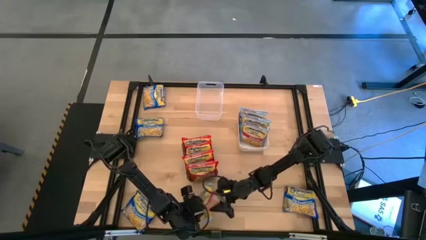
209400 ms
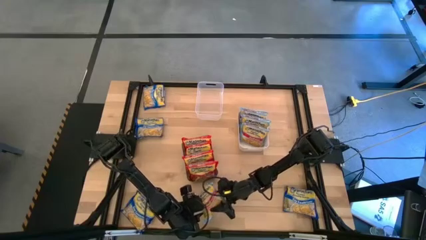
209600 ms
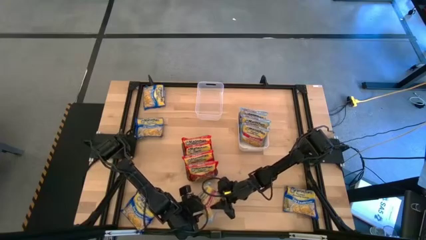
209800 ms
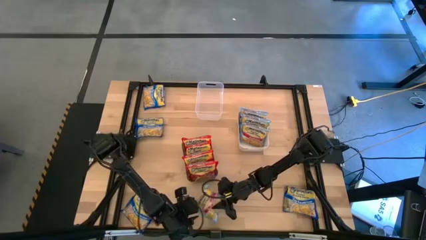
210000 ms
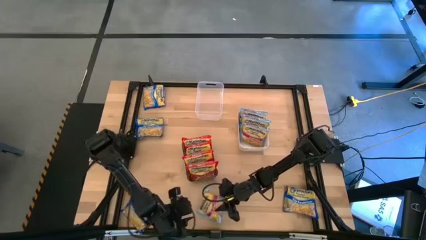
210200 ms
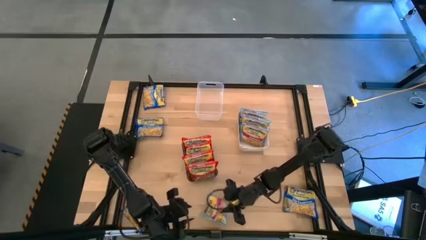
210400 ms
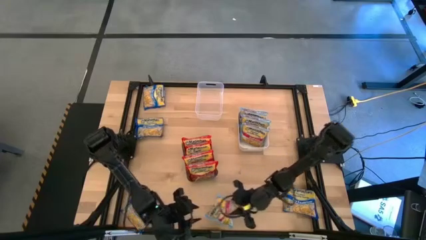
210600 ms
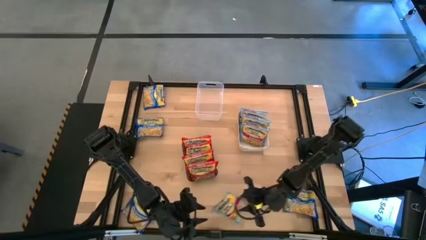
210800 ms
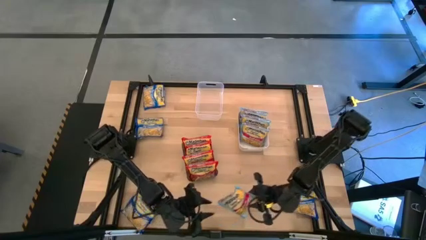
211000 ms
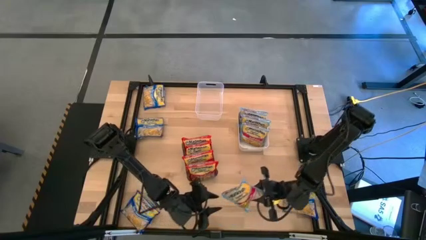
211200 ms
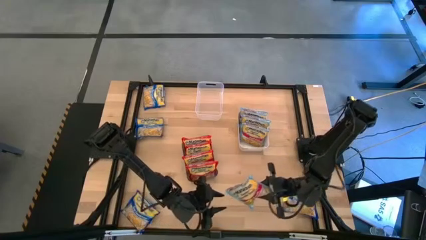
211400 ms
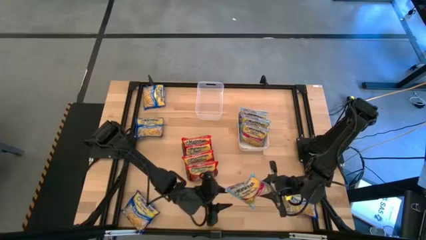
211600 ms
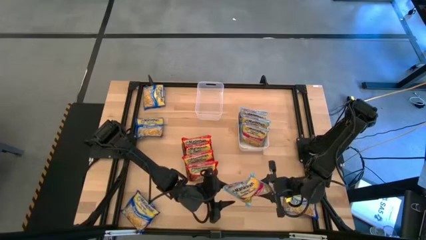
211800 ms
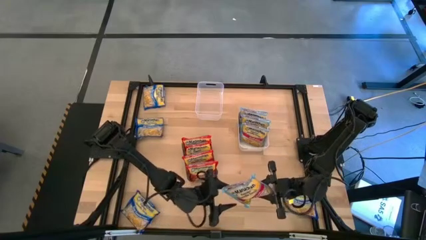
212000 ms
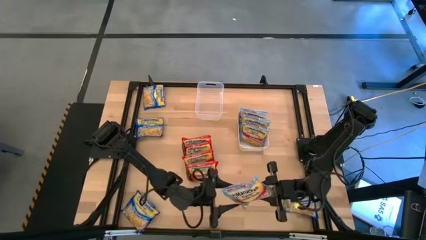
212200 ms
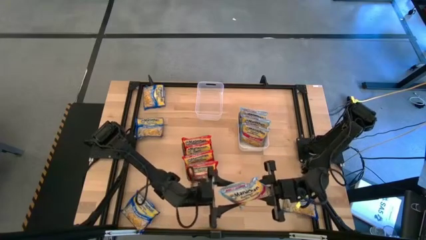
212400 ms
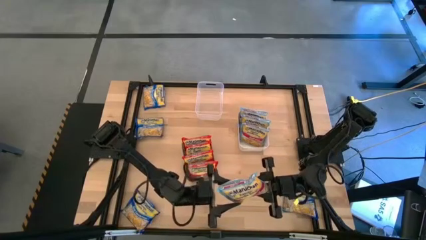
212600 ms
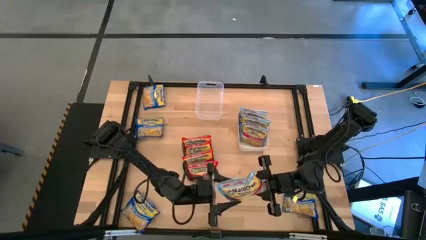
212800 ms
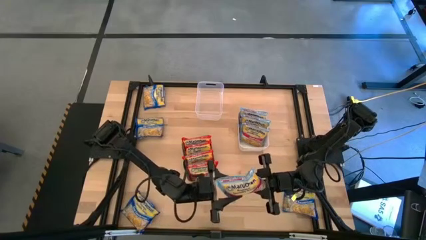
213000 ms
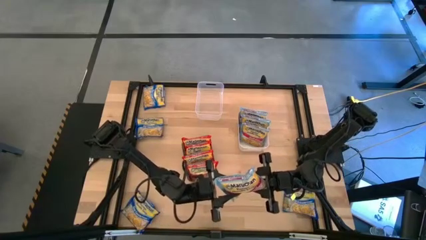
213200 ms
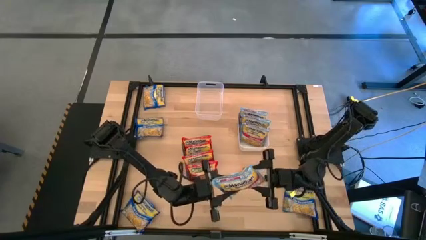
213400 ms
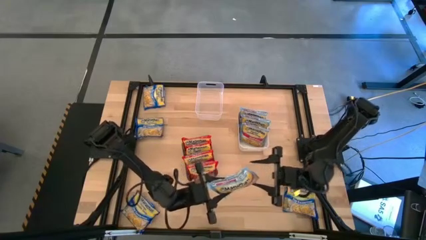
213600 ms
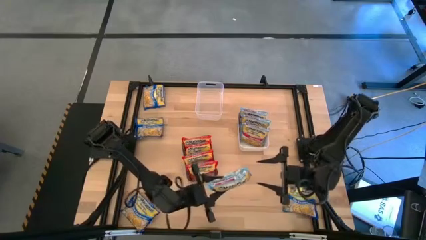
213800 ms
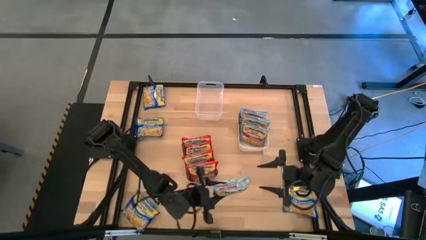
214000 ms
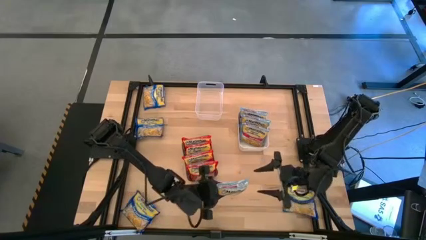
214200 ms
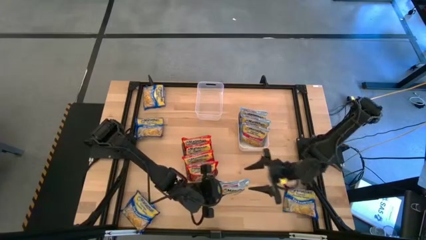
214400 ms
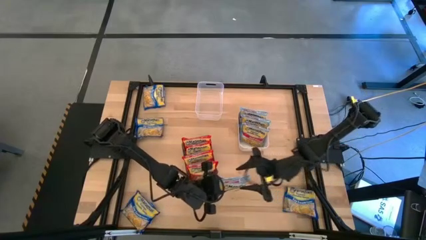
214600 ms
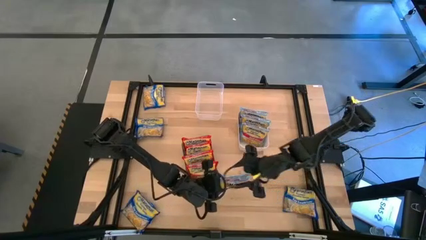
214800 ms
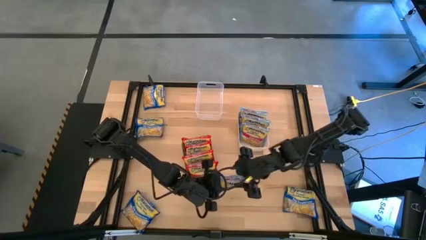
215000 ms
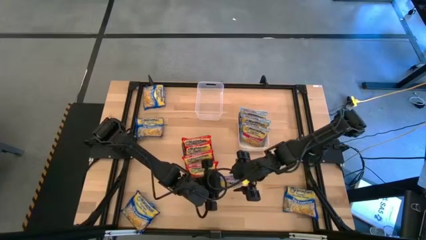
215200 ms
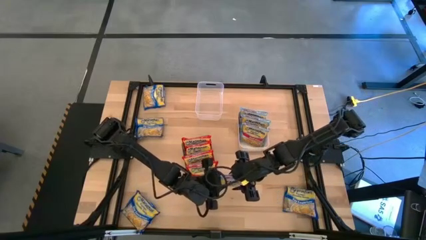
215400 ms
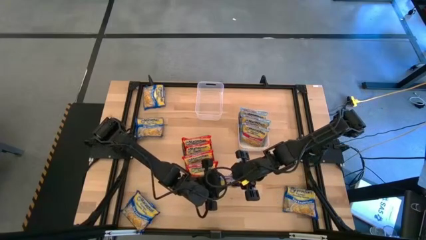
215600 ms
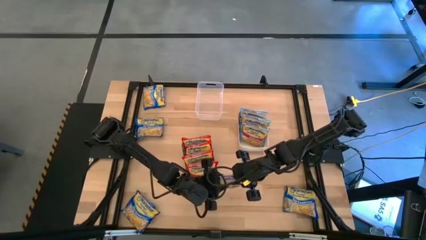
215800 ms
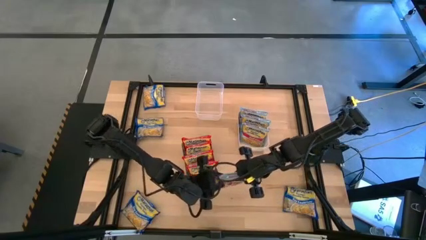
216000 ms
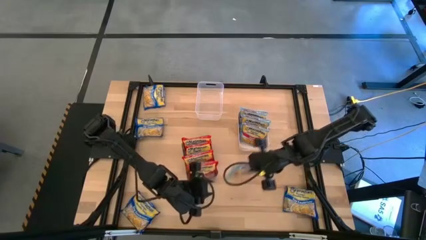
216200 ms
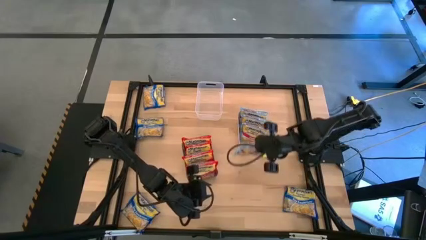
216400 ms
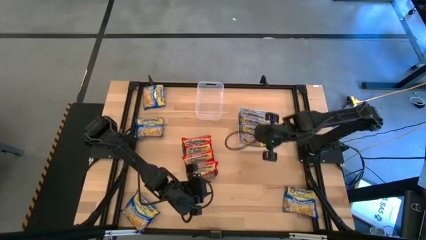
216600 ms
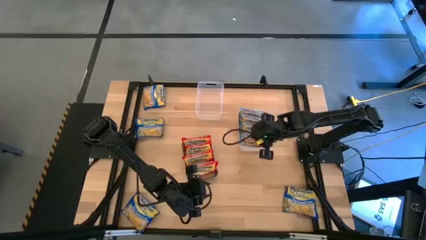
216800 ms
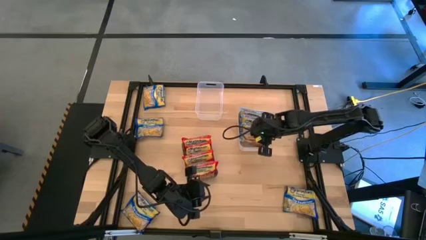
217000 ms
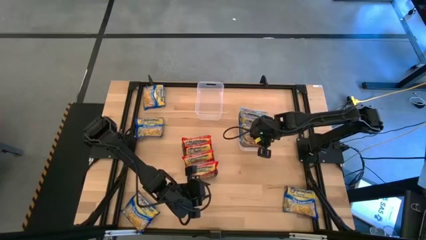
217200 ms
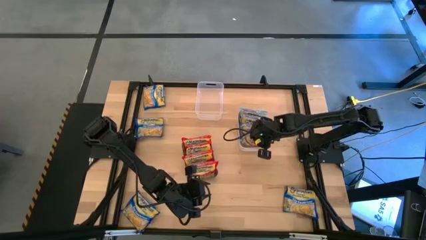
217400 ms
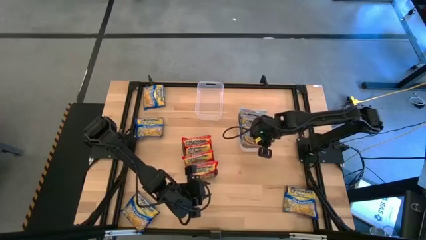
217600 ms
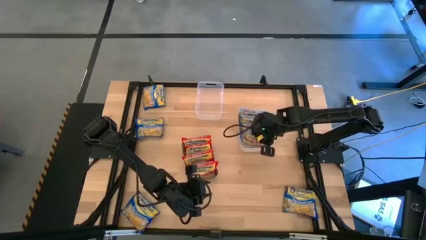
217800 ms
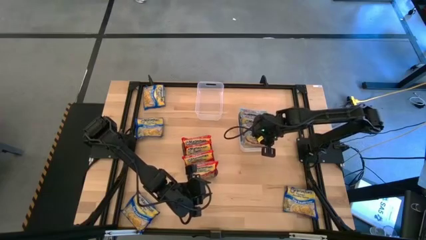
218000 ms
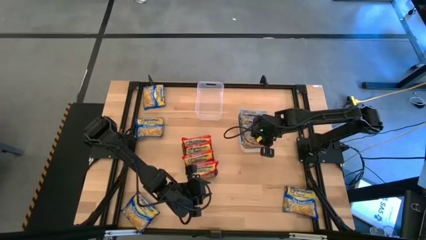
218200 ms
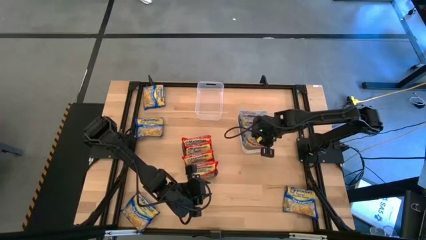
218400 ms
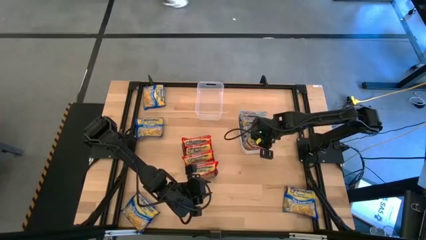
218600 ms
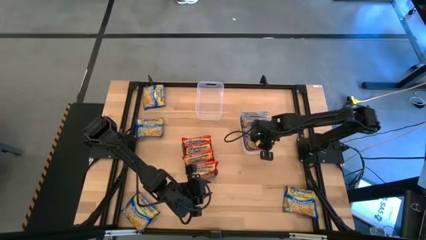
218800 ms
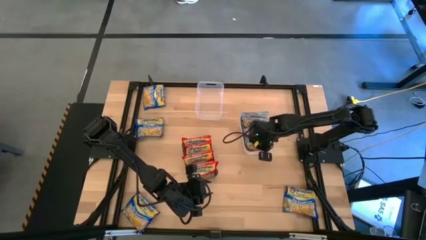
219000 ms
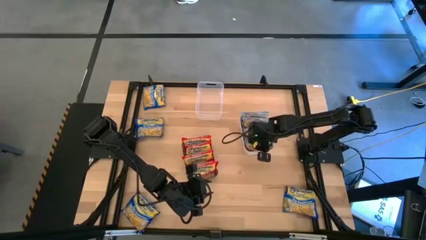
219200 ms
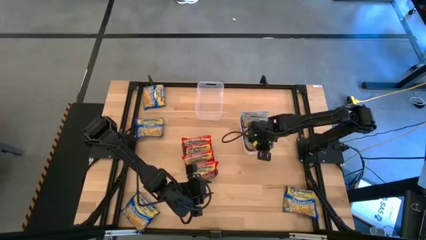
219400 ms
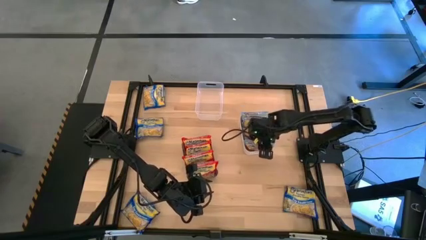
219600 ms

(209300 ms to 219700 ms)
Task: Sort Maruchan noodles
Put the light blue noodle pack into the white bin

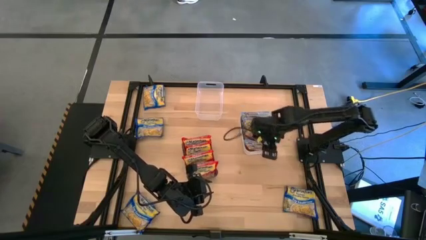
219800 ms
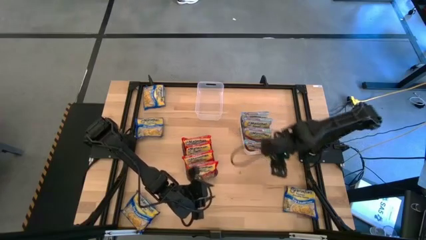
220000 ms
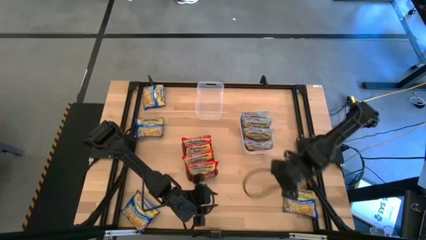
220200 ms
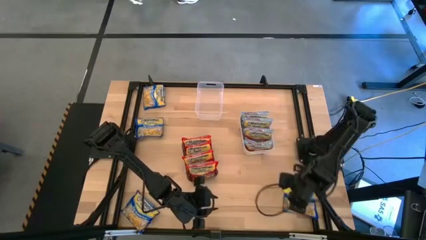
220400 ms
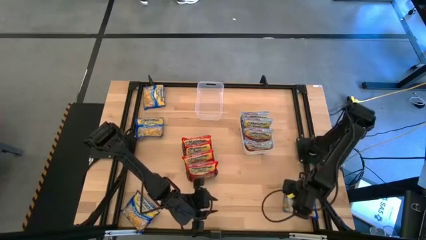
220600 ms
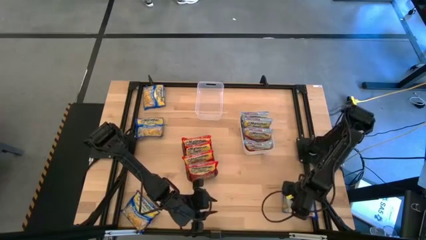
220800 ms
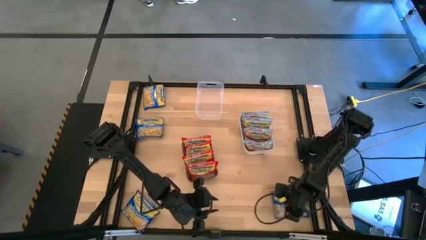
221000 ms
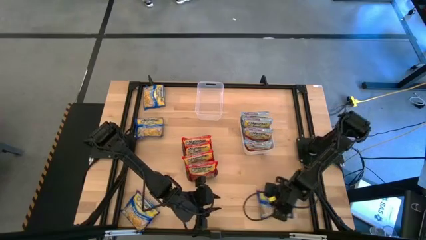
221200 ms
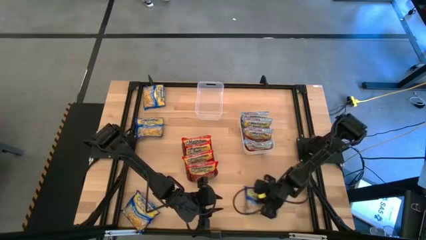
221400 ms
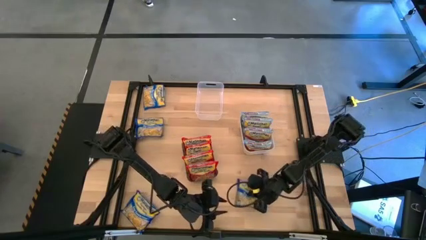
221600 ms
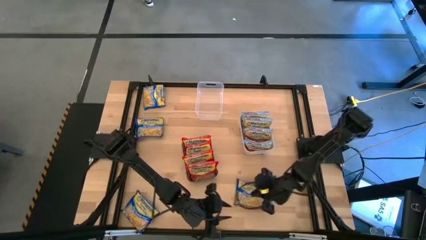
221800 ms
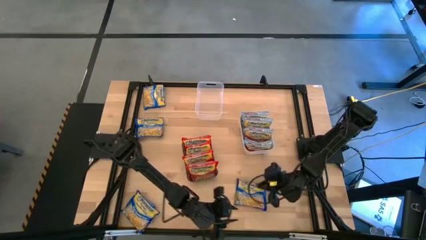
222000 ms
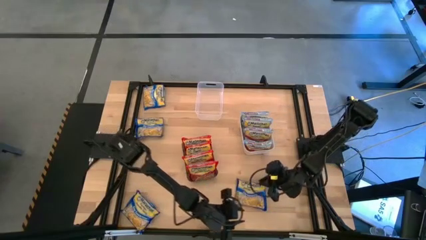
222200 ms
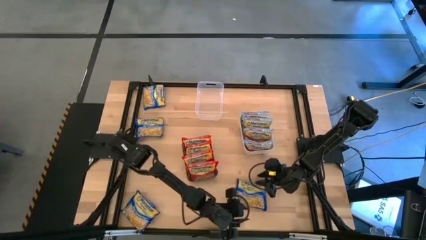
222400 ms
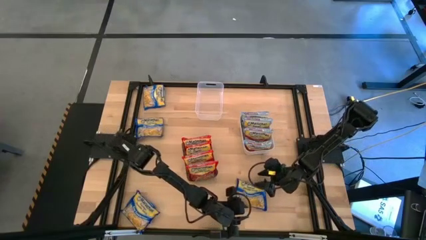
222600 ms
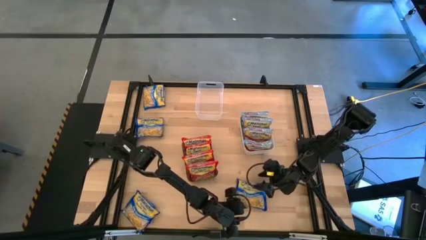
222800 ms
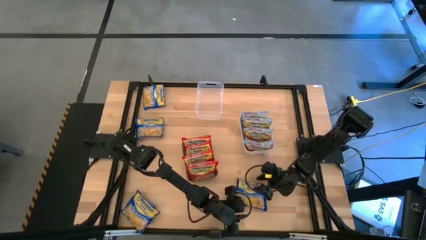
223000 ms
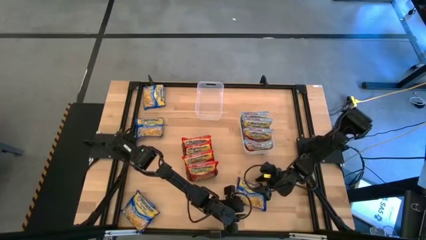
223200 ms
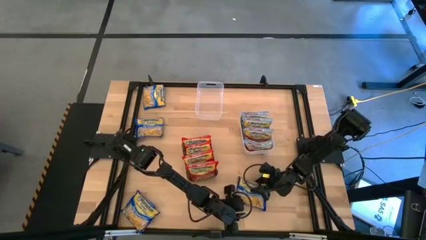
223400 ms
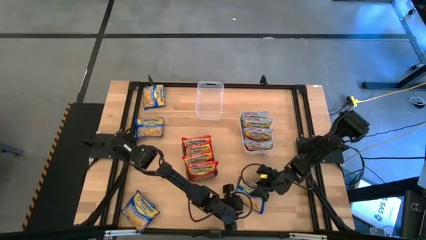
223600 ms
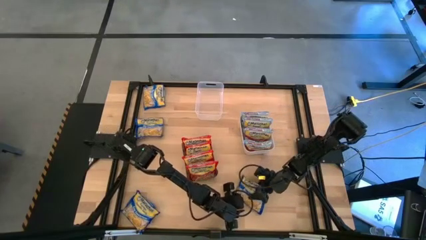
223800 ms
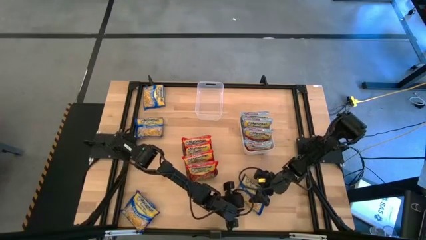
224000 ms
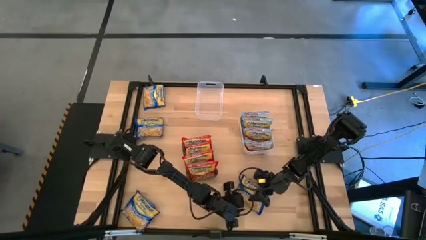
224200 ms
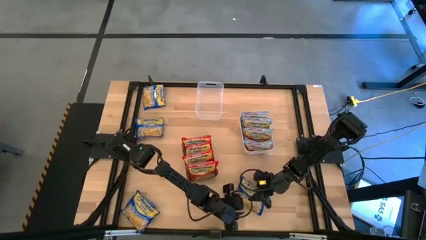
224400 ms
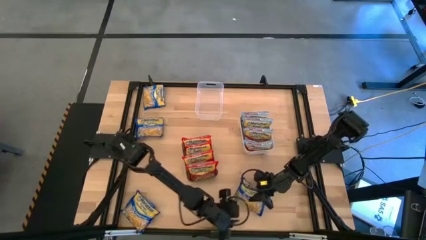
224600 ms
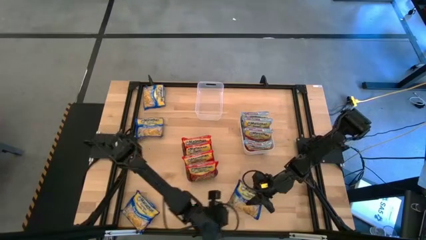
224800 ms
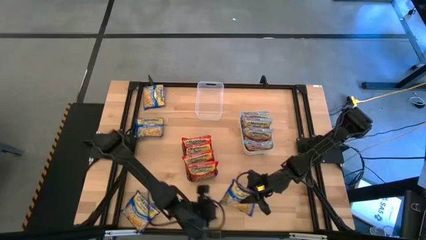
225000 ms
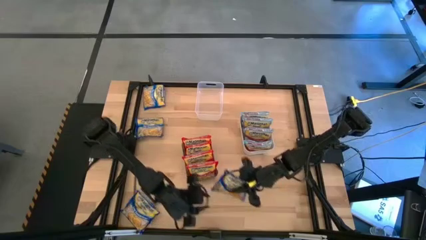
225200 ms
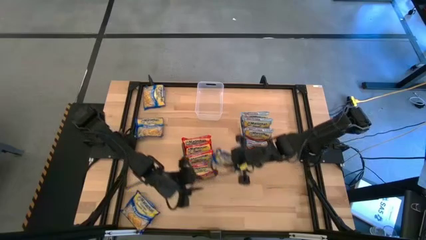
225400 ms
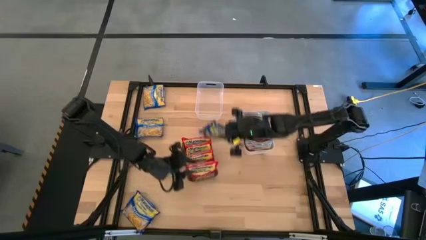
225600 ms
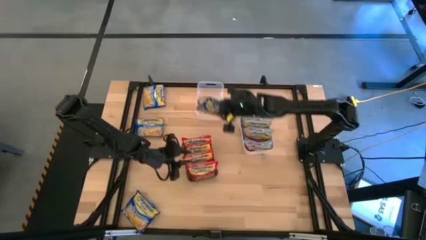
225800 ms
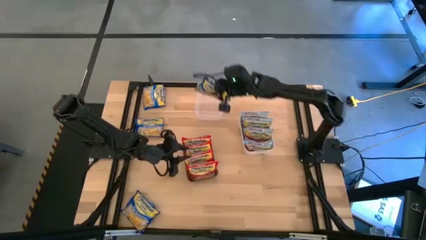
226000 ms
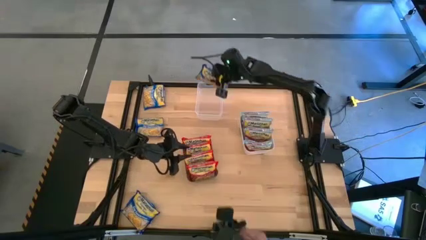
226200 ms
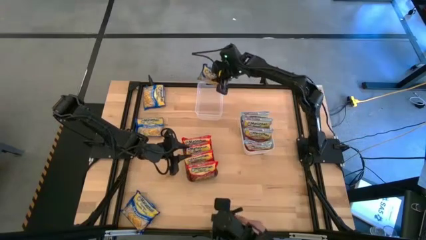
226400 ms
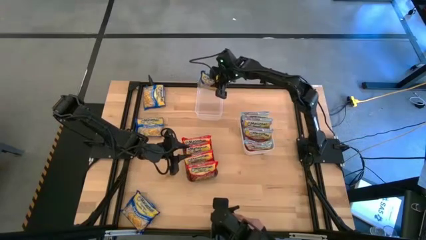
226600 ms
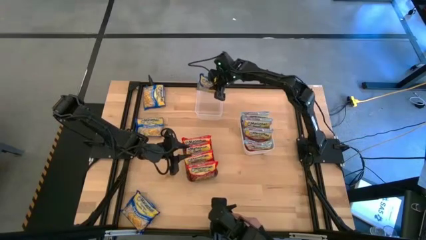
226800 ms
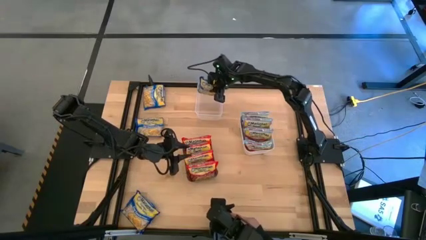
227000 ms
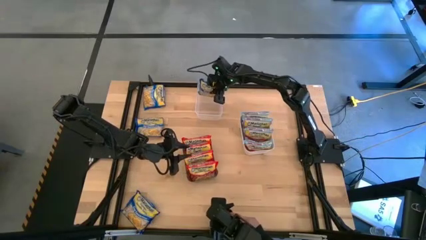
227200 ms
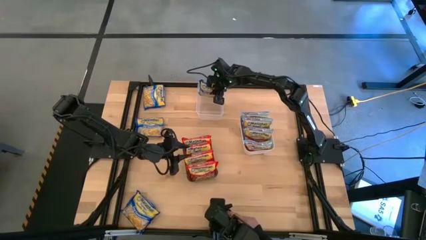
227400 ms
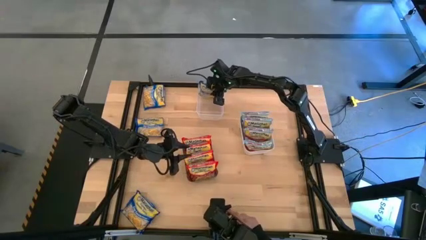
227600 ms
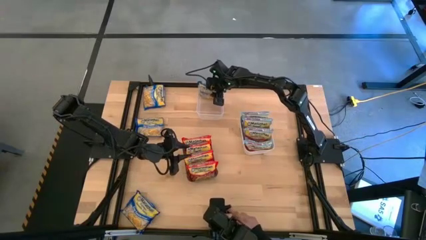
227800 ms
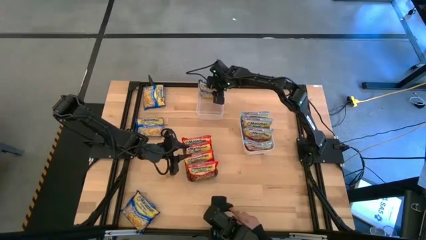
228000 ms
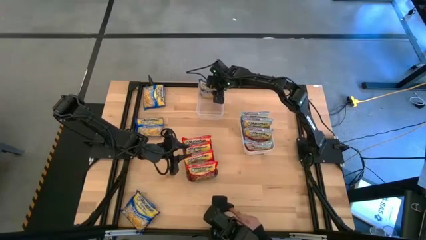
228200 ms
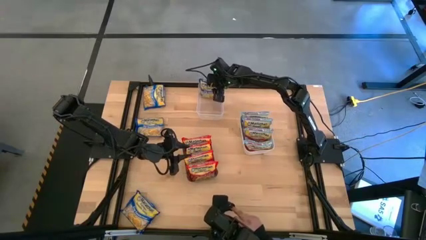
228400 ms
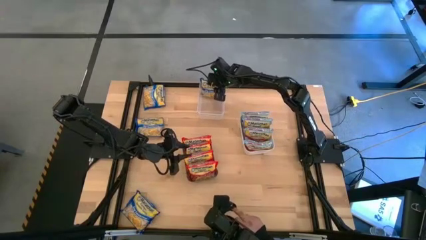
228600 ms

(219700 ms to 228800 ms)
Put the blue noodle pack into the transparent bin
